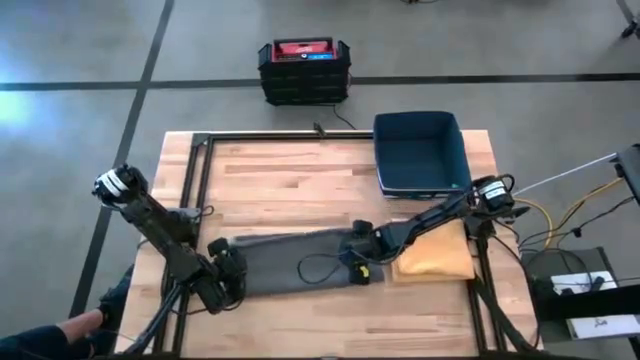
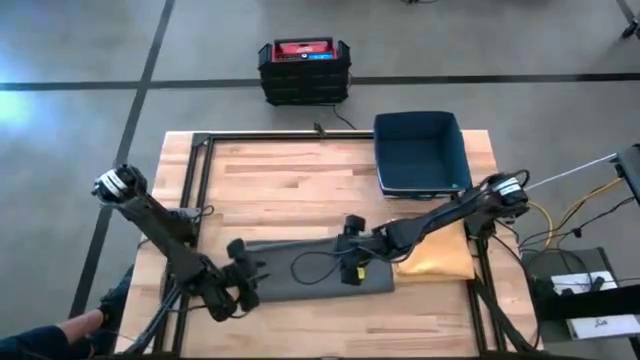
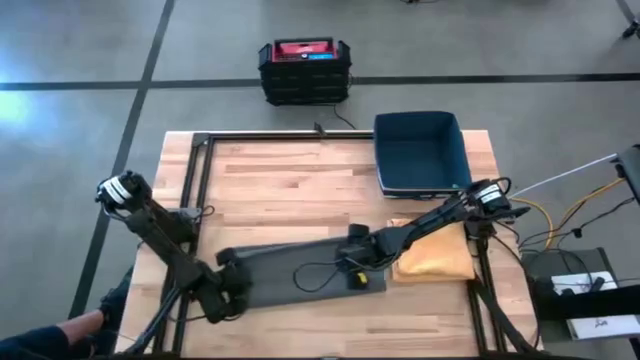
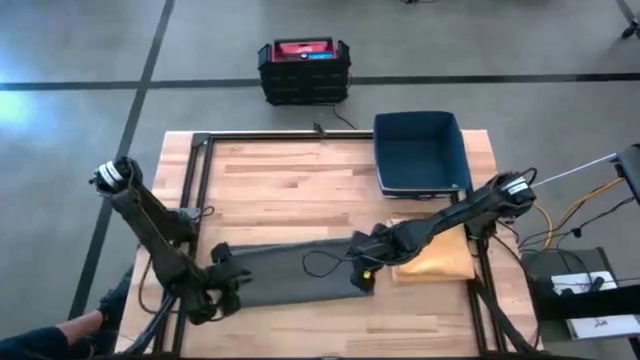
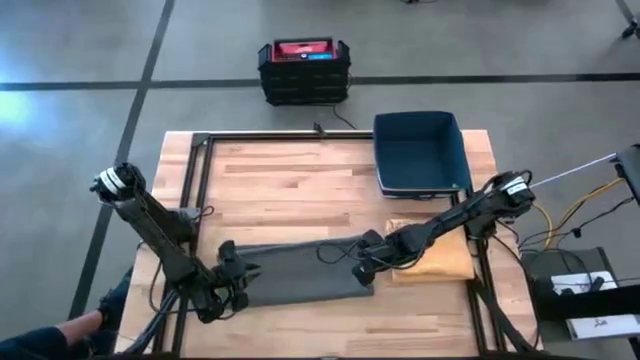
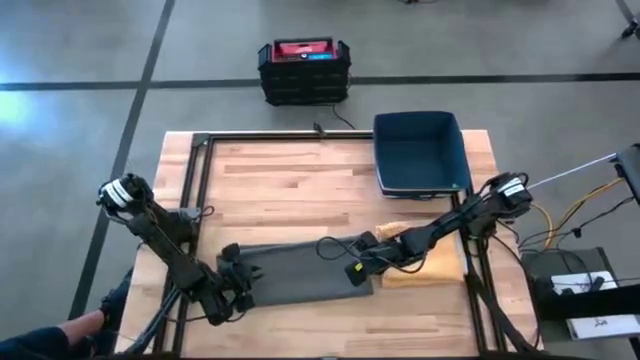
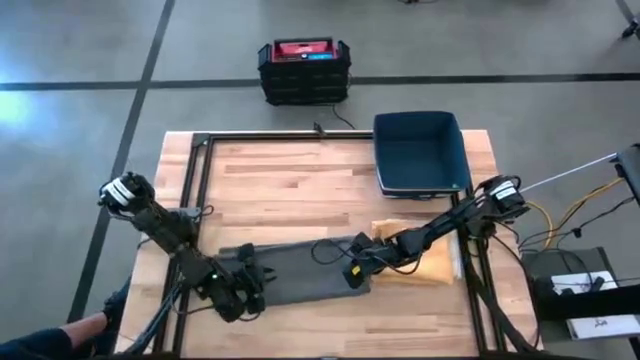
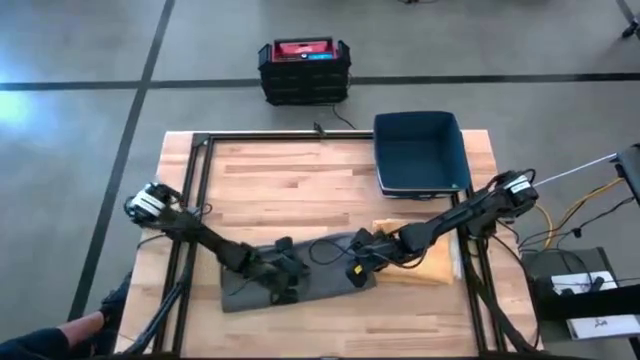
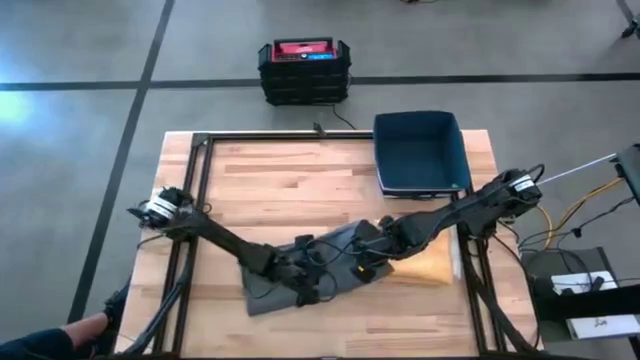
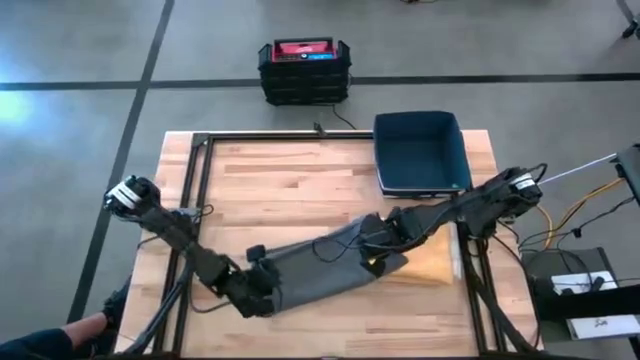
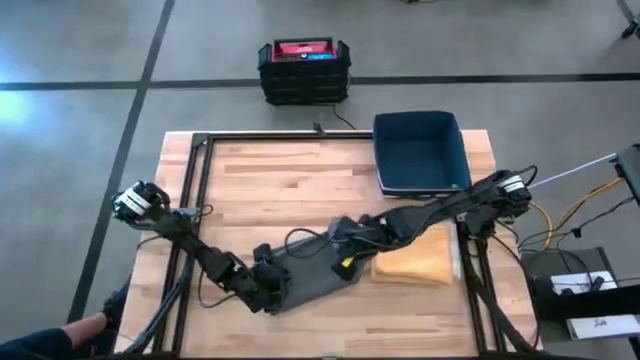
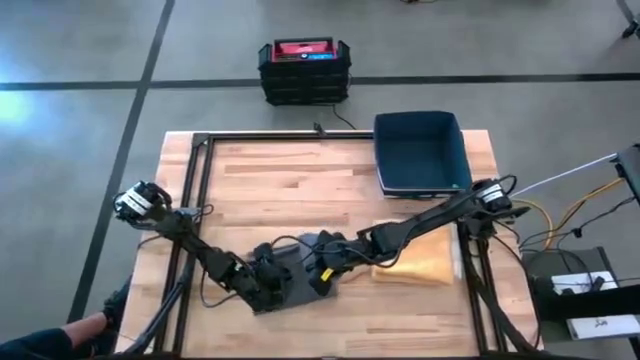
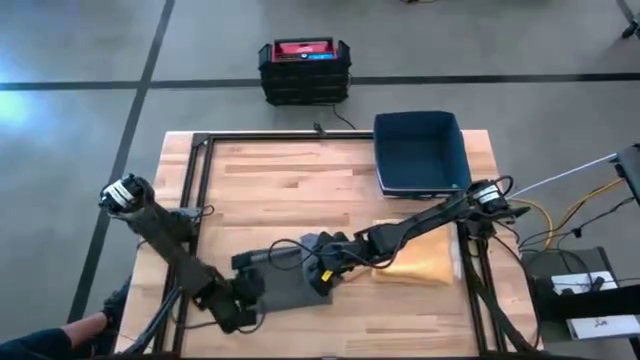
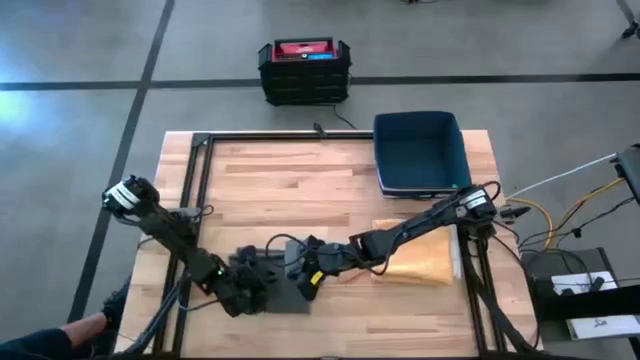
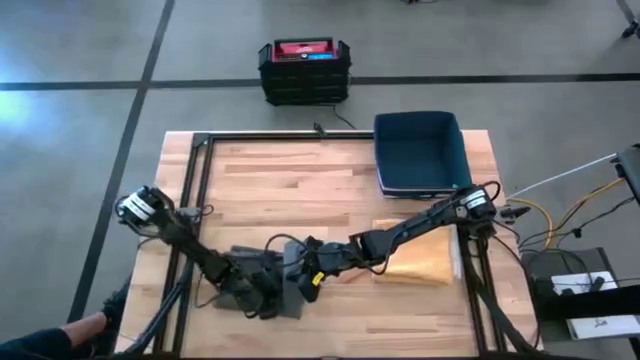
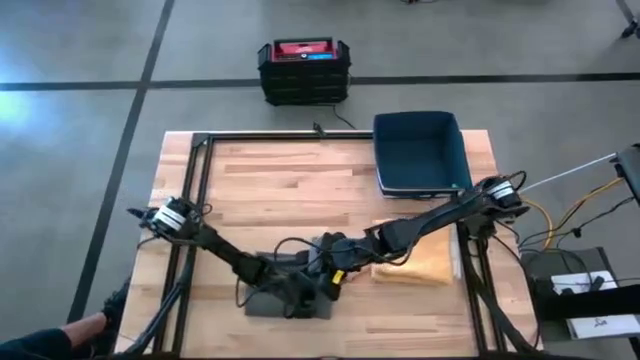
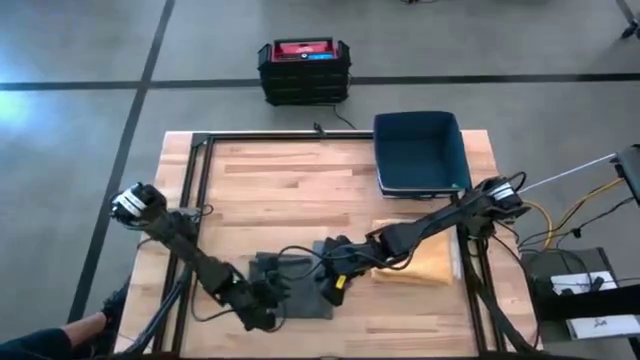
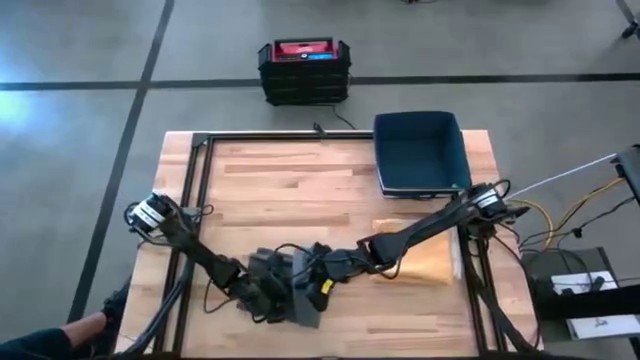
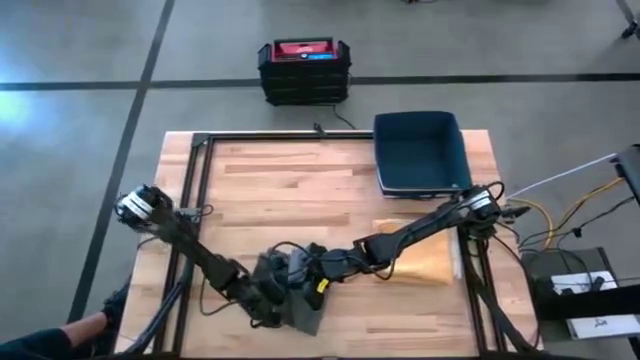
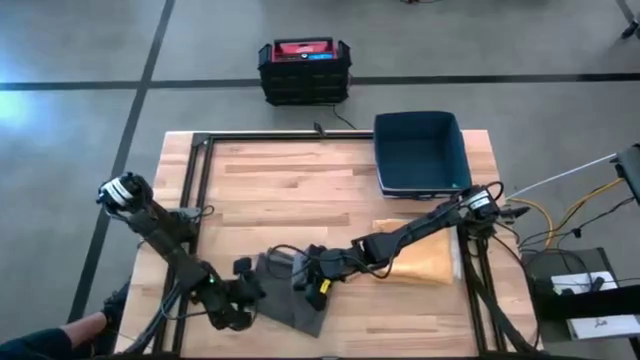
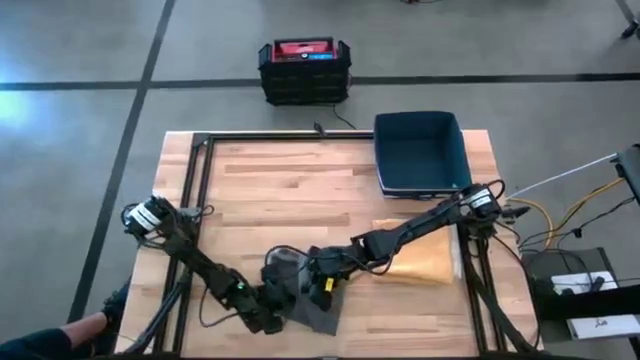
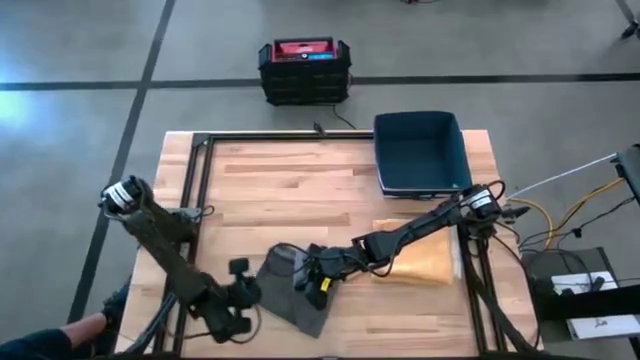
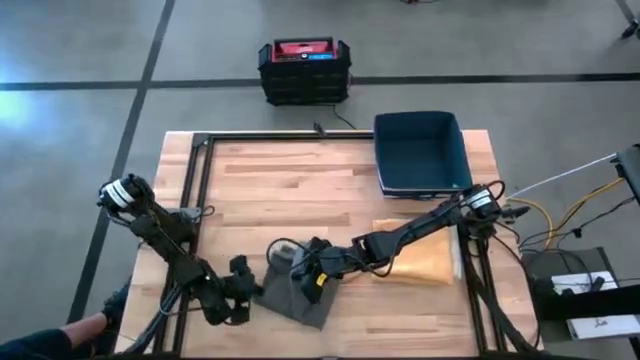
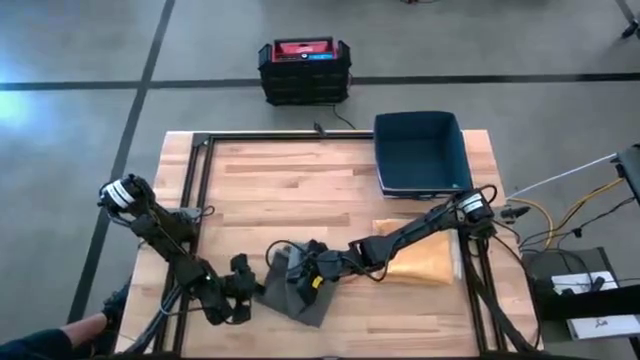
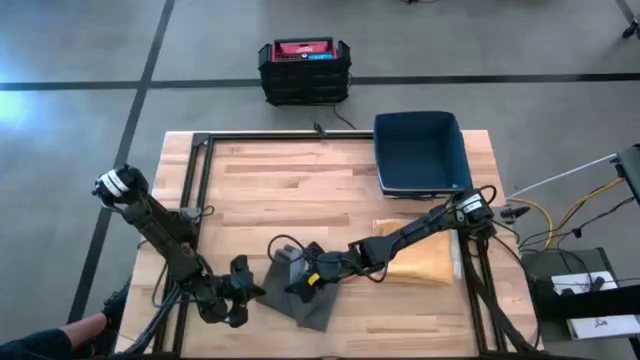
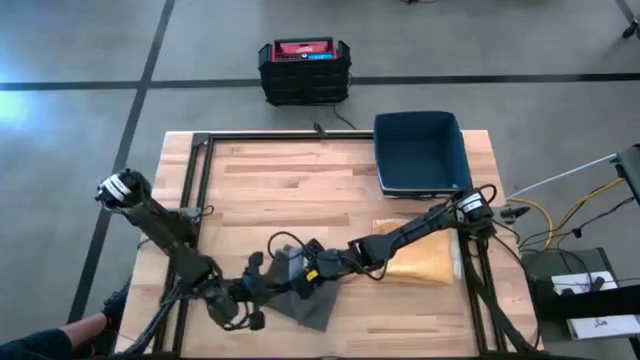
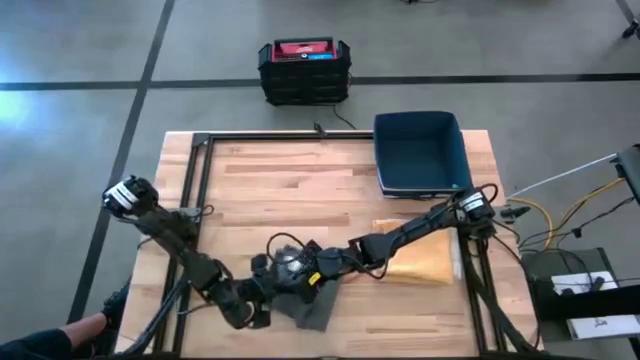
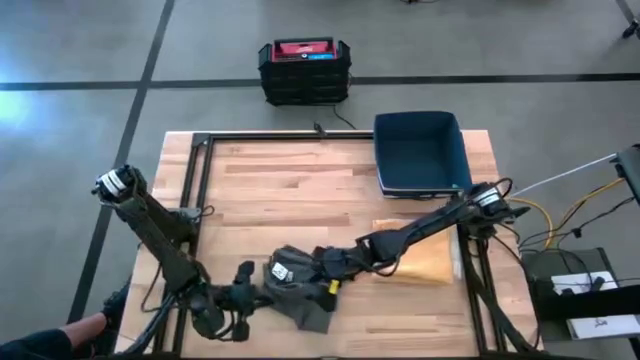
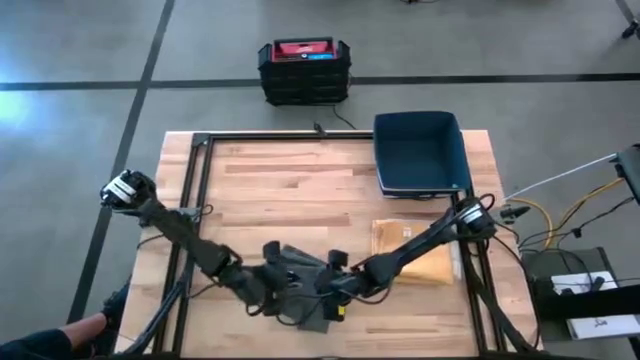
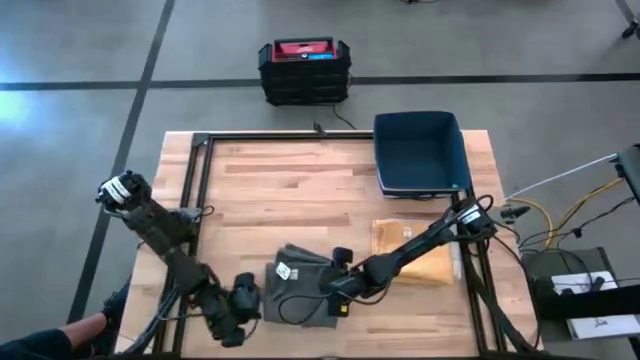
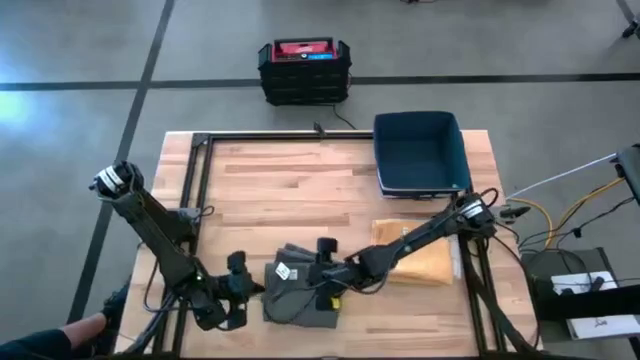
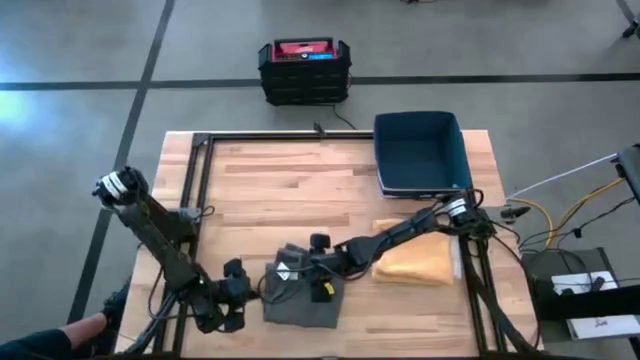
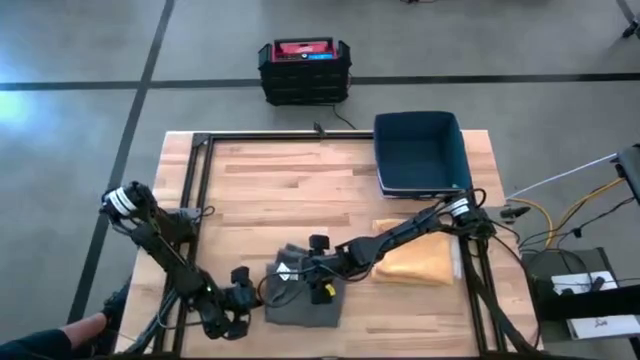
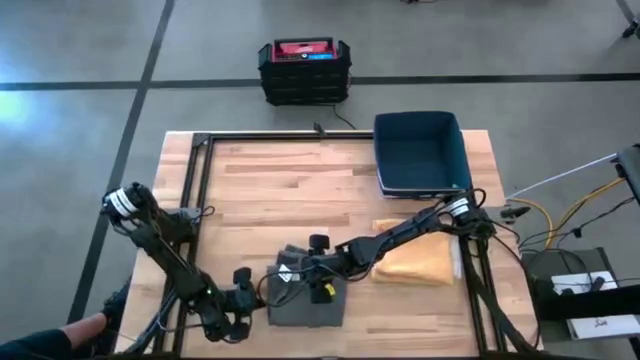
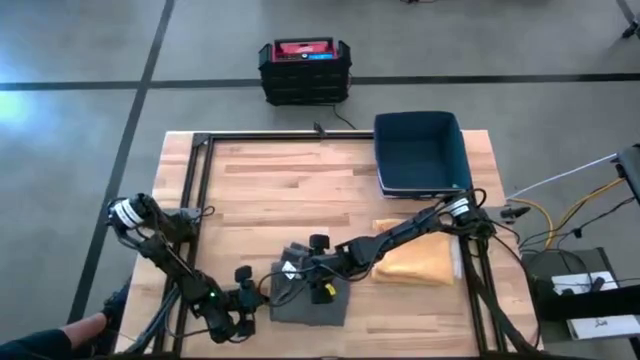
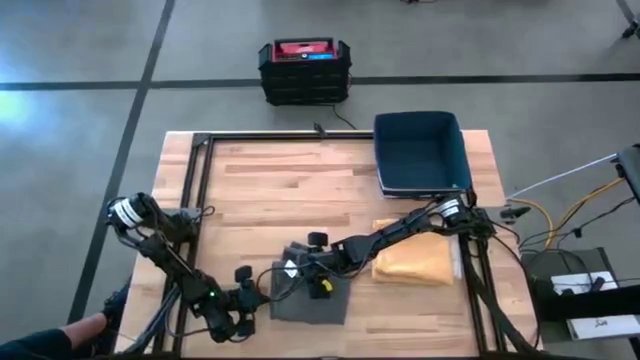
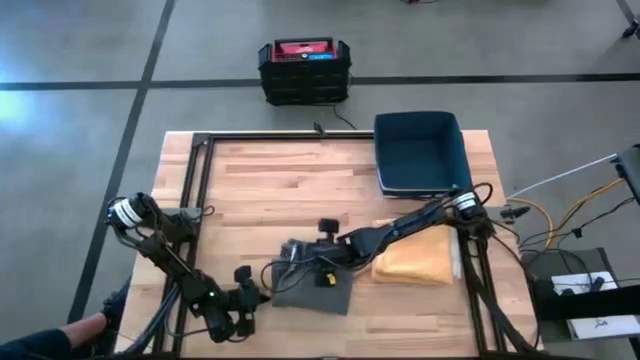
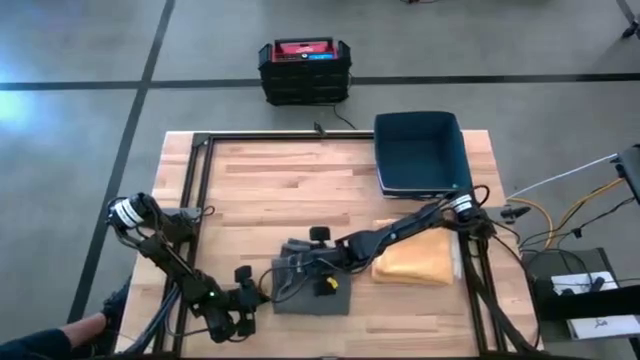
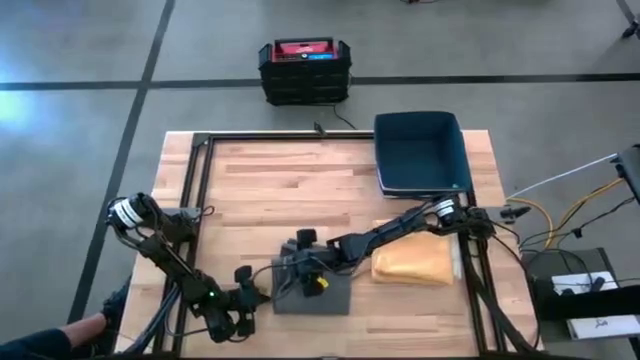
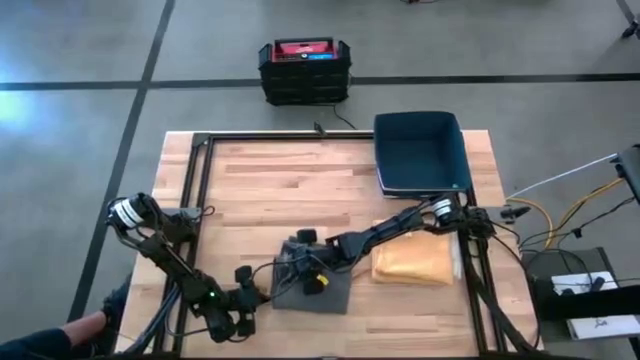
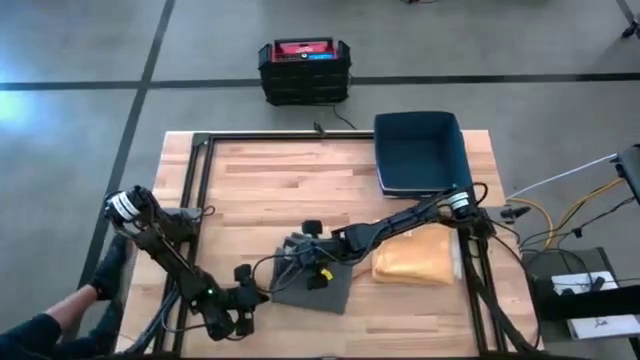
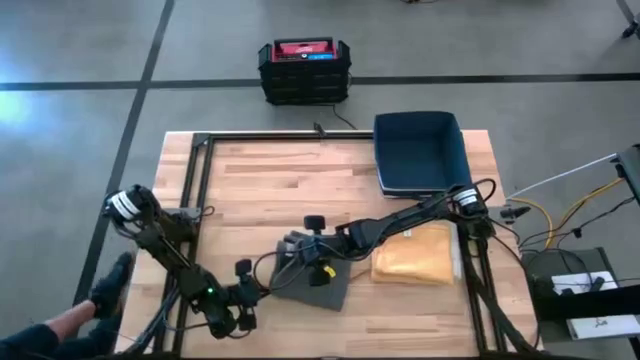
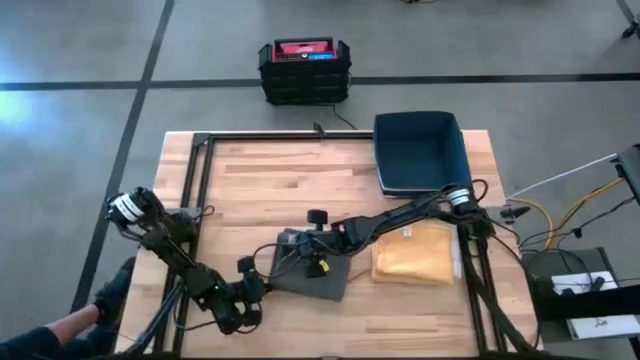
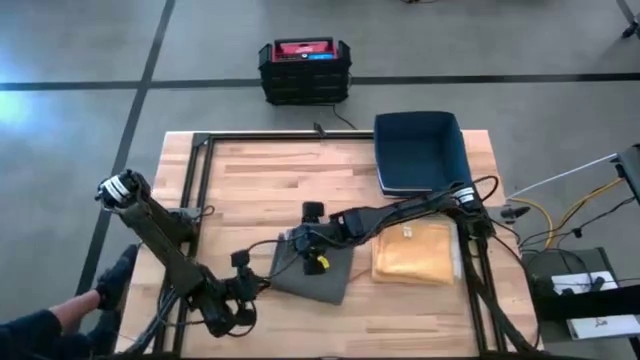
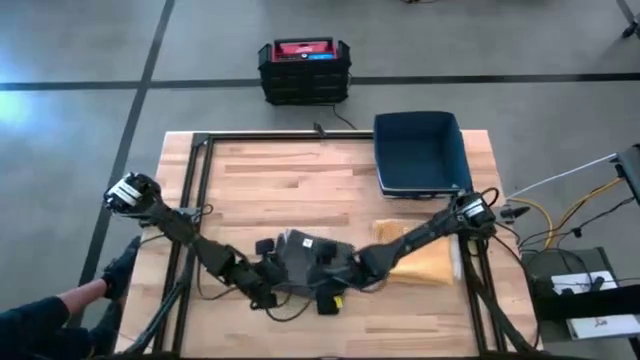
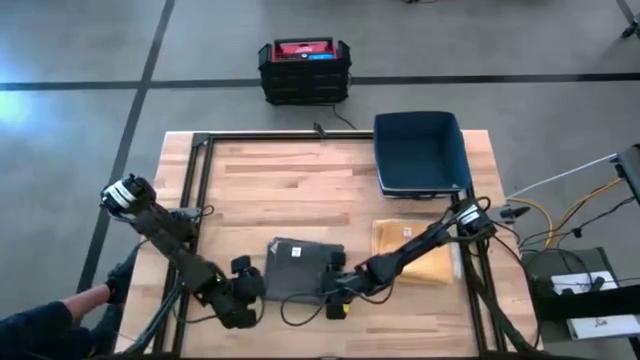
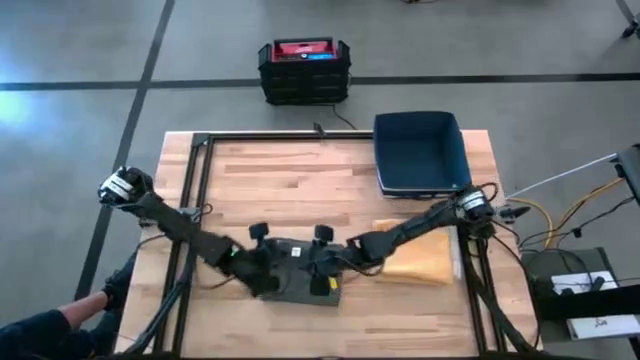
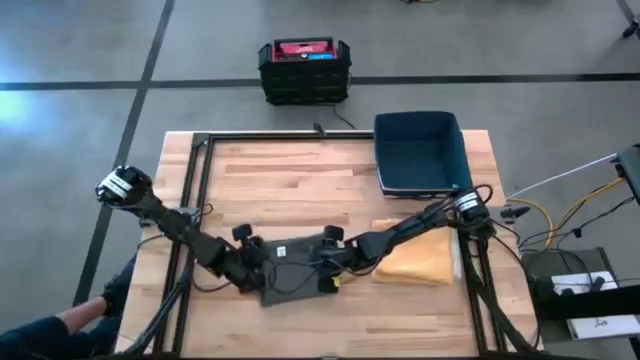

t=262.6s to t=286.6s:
Task: Fold towel
Fold the gray towel
